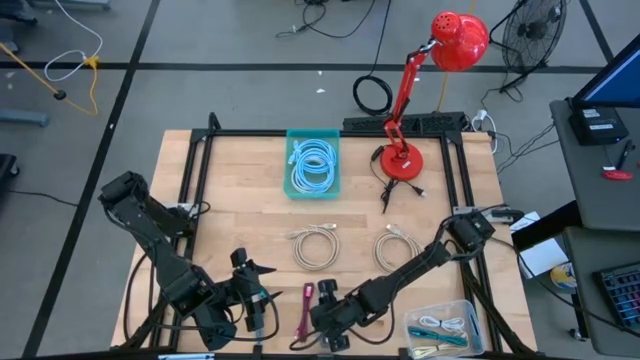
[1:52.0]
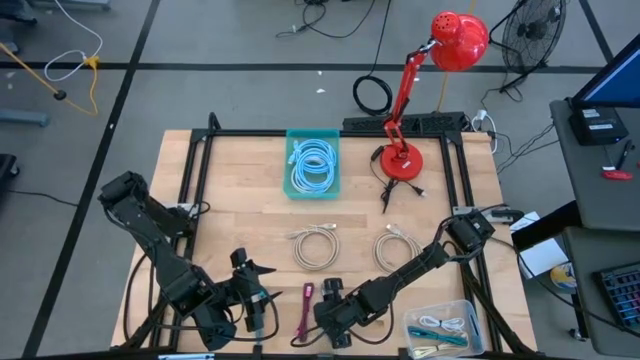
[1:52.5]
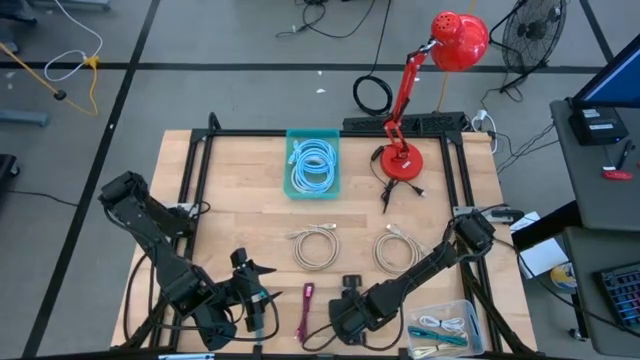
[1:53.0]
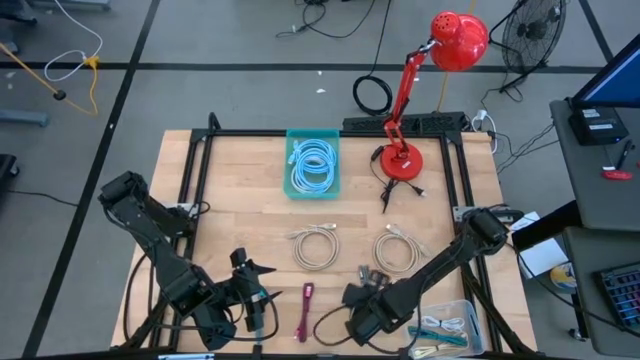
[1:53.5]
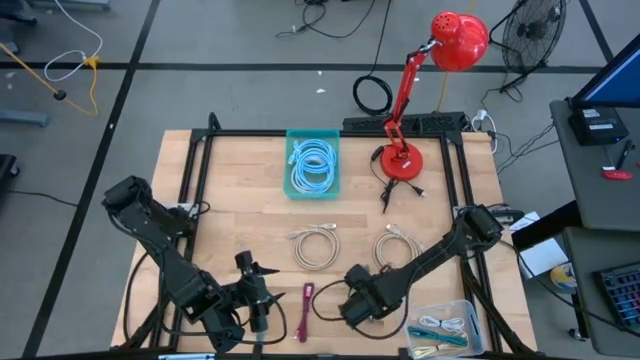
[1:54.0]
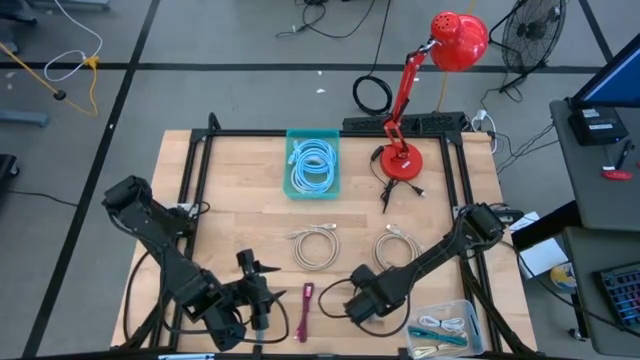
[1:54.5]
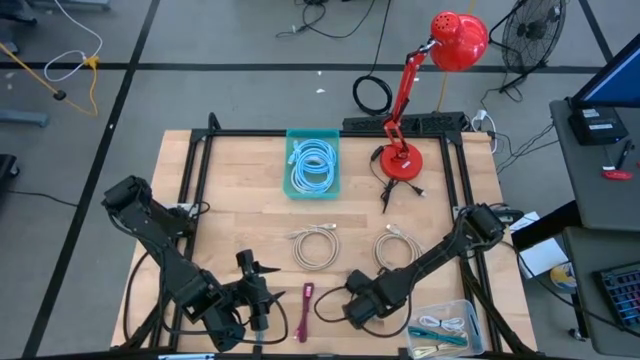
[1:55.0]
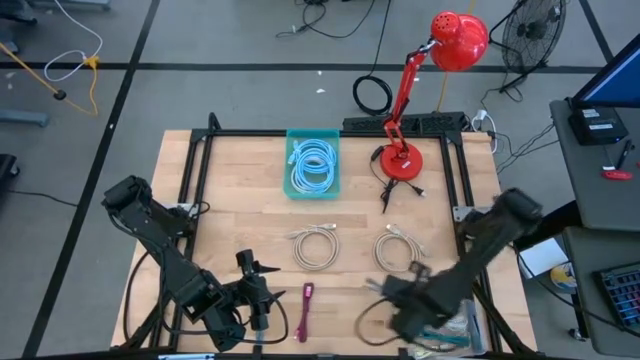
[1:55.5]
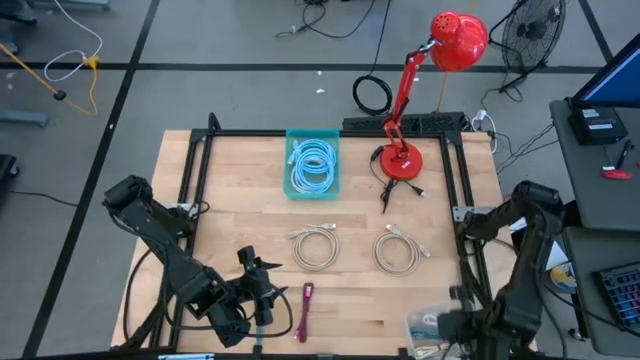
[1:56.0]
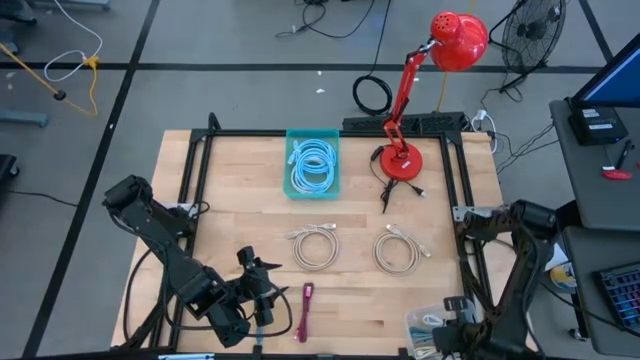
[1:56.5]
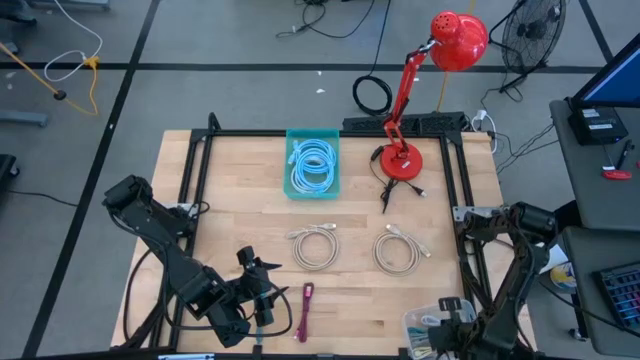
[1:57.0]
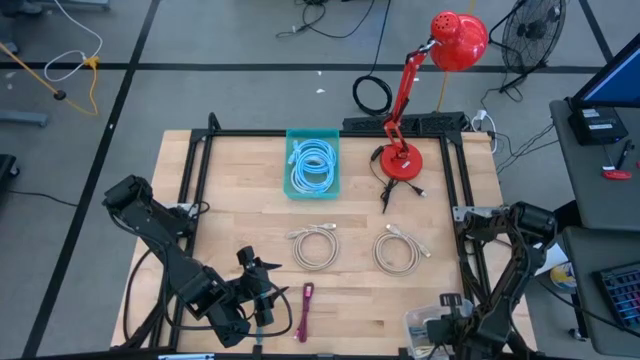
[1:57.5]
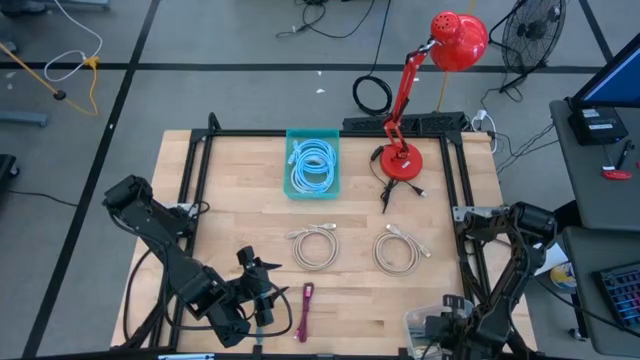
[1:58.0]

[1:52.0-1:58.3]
Task: Pick & Place USB Port
Put the gray USB cable into the transparent bin

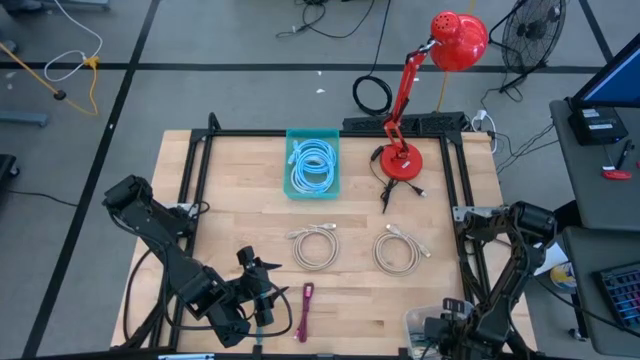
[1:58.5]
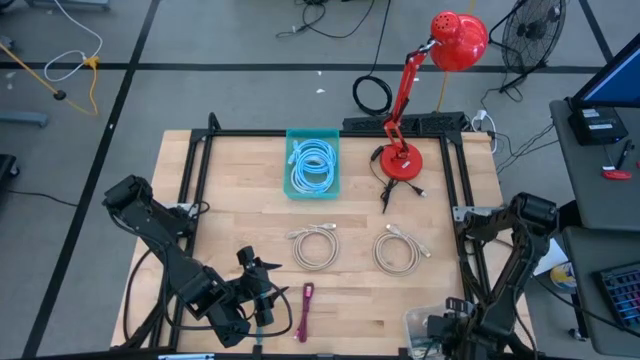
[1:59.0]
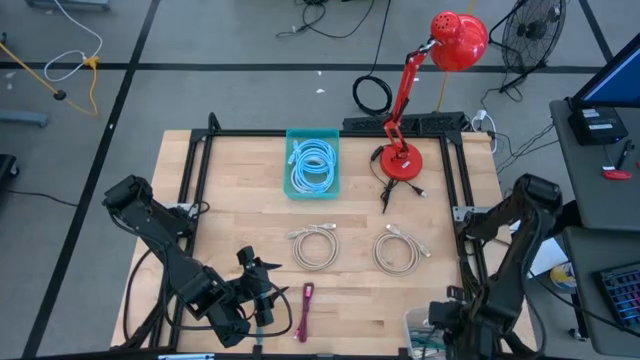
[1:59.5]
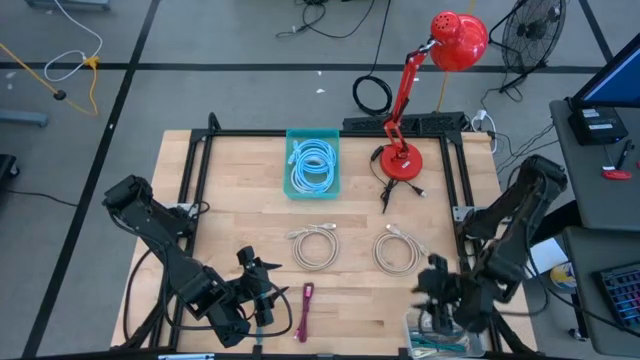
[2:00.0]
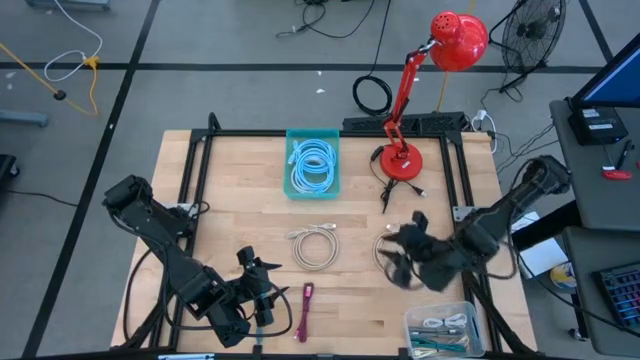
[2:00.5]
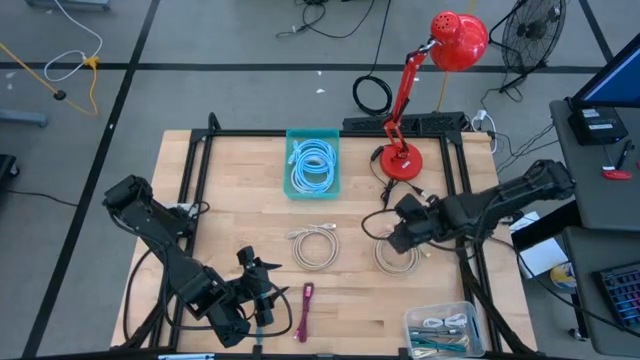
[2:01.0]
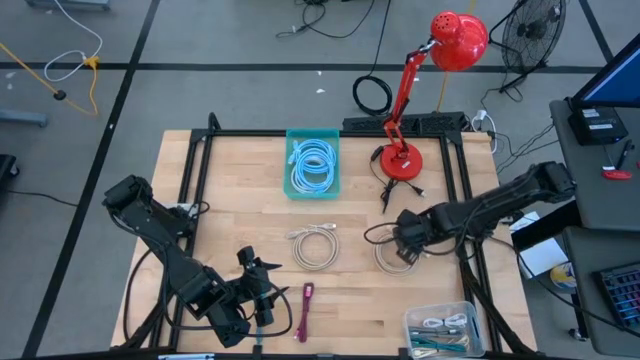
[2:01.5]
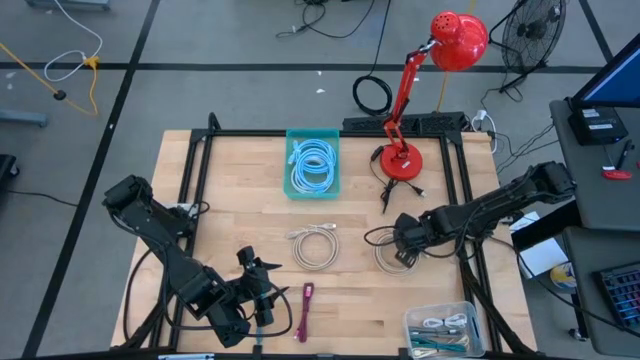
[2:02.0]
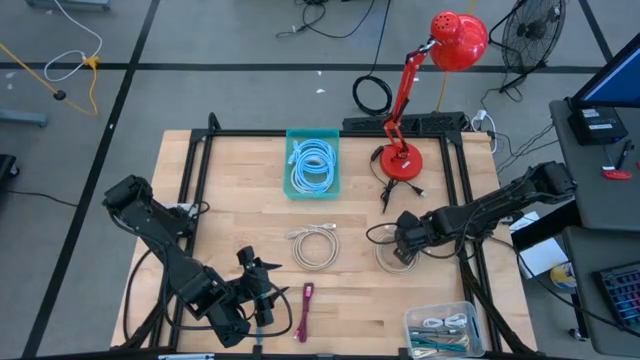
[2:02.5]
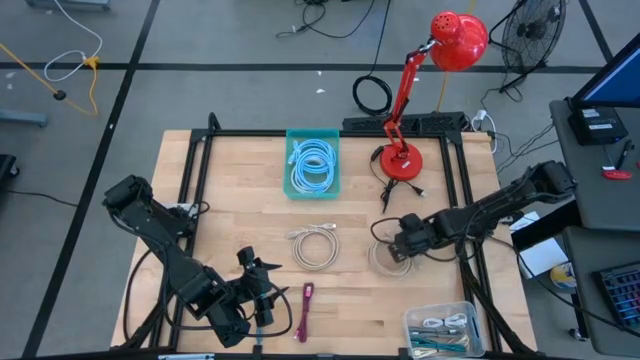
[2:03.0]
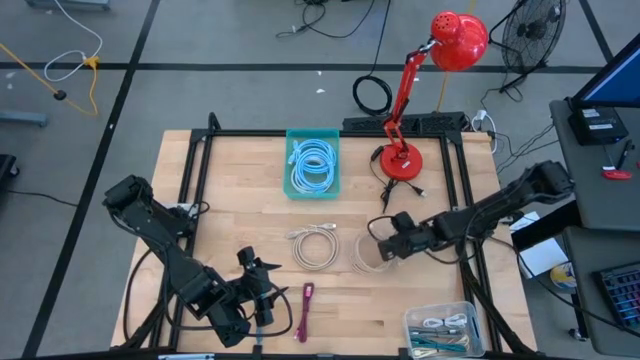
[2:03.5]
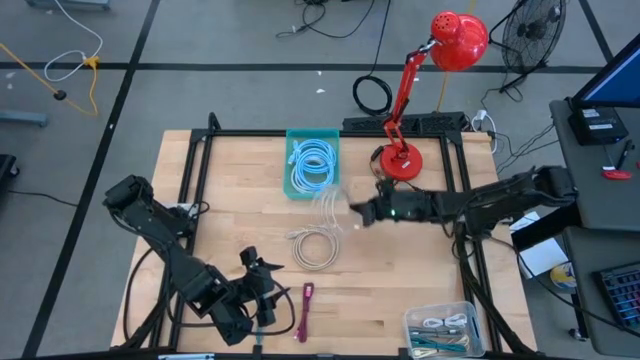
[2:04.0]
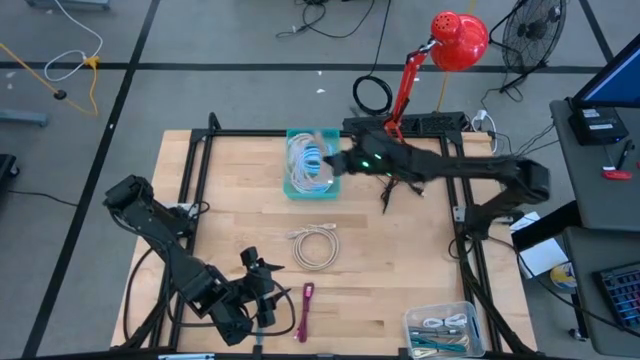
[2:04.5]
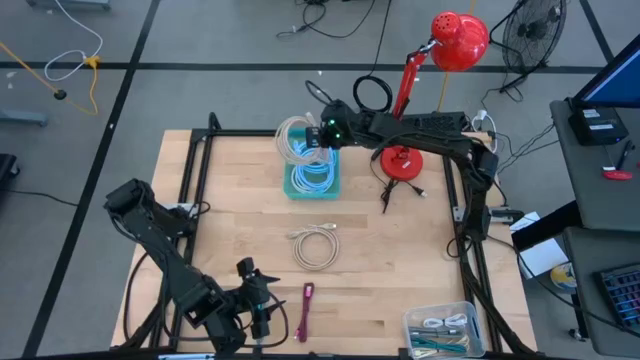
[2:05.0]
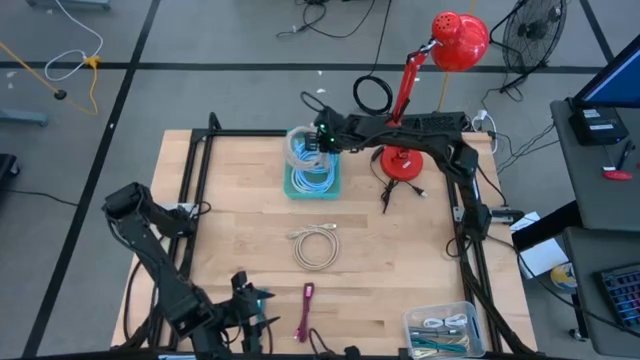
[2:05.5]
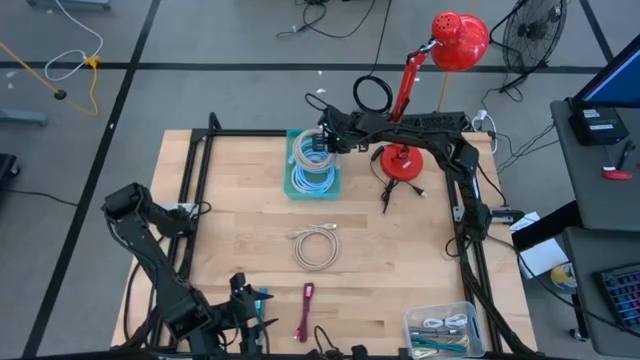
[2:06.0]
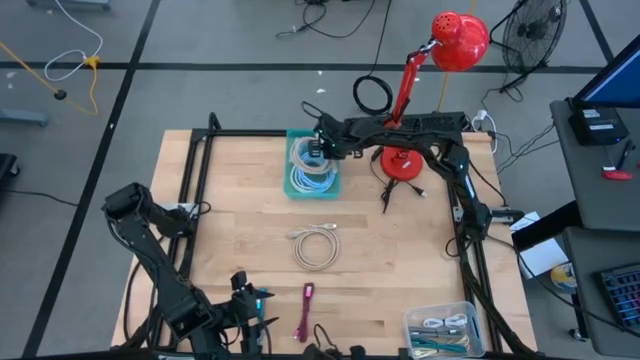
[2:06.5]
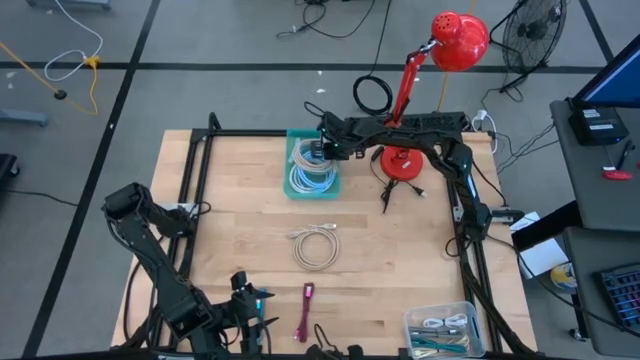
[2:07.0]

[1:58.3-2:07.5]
Put the right brown HDMI cable into the green bin

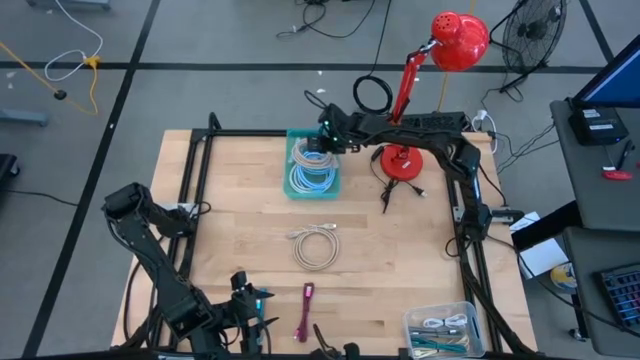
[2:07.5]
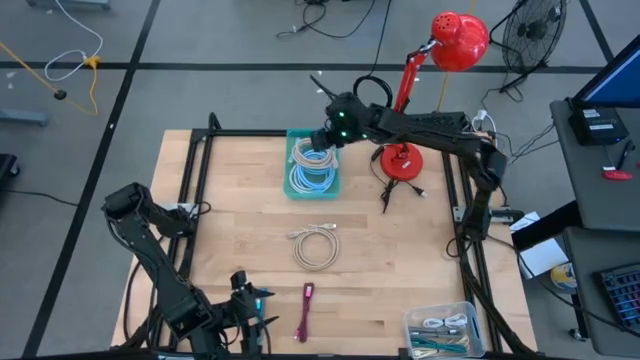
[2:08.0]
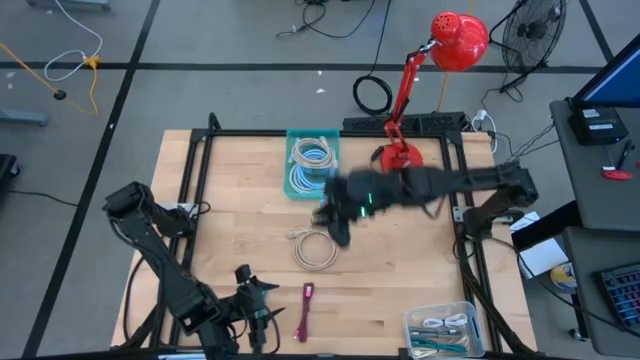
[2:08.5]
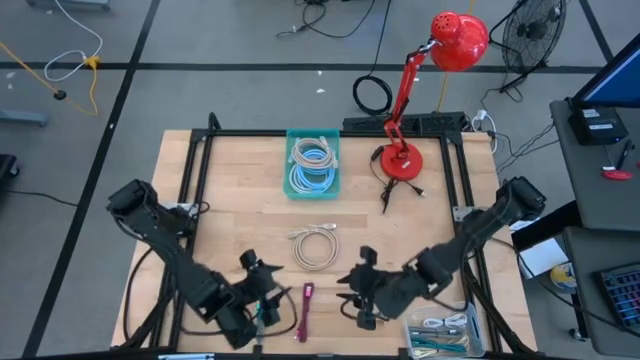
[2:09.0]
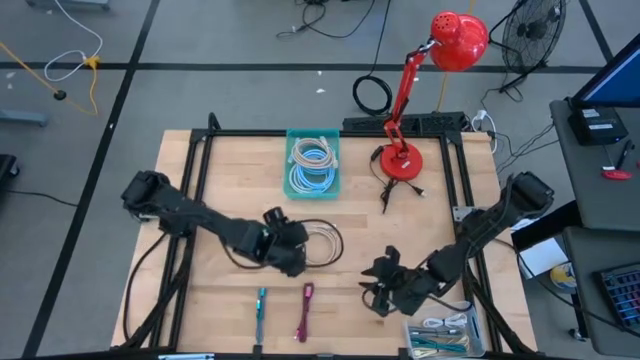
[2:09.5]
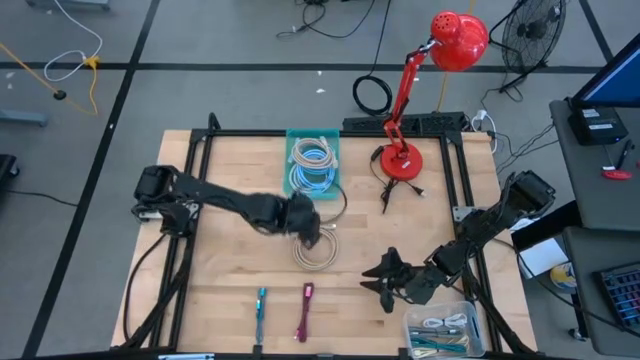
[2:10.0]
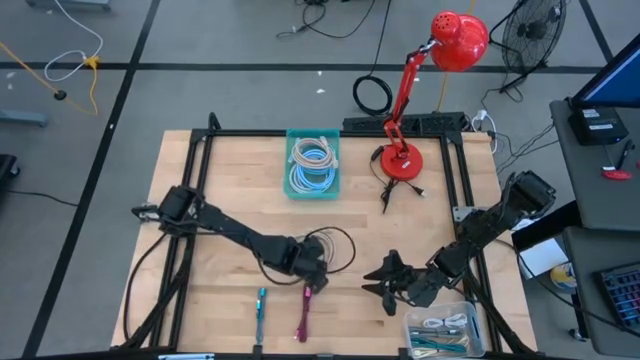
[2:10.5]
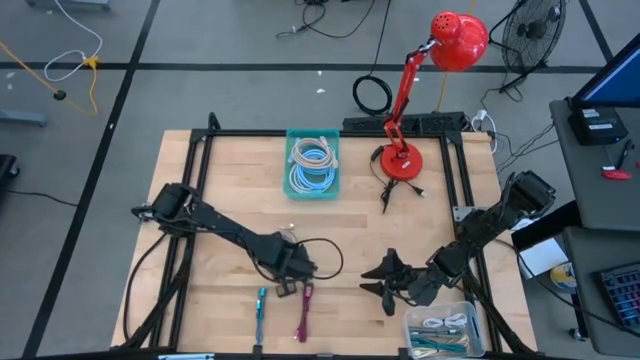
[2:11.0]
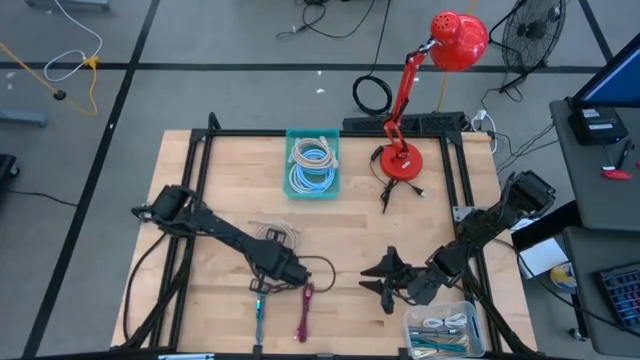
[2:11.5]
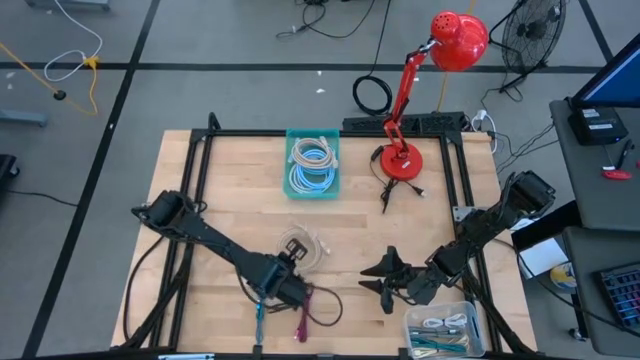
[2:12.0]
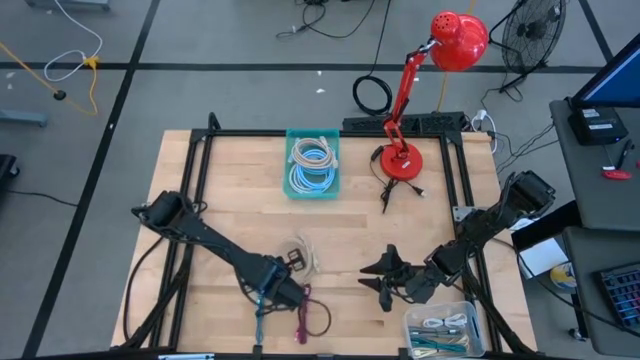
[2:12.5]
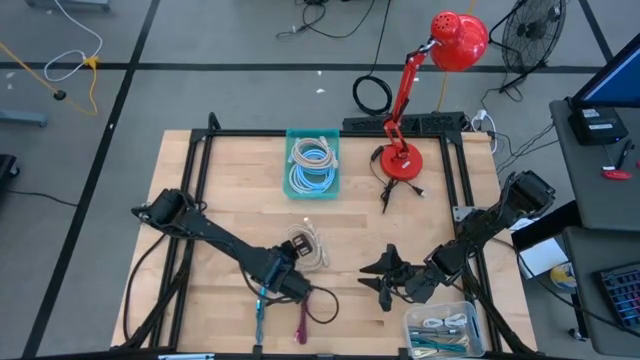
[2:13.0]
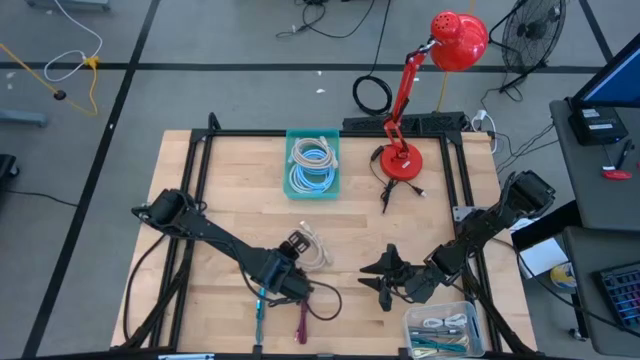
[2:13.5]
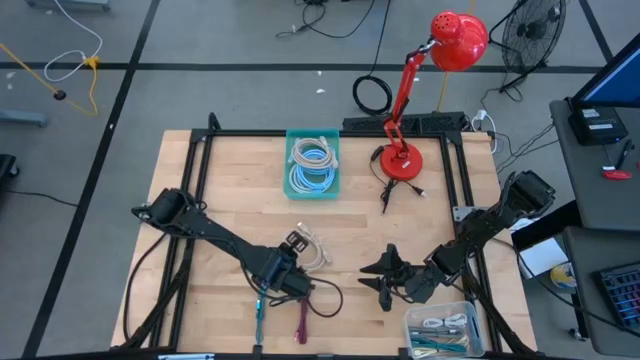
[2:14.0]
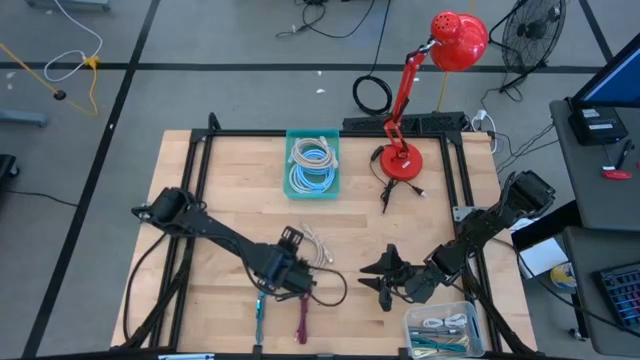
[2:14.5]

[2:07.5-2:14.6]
Put the brown HDMI cable into the green bin
